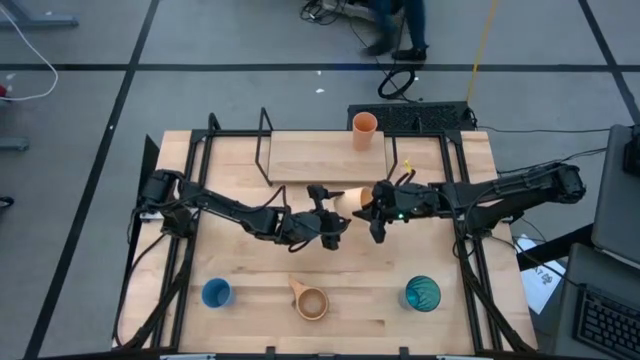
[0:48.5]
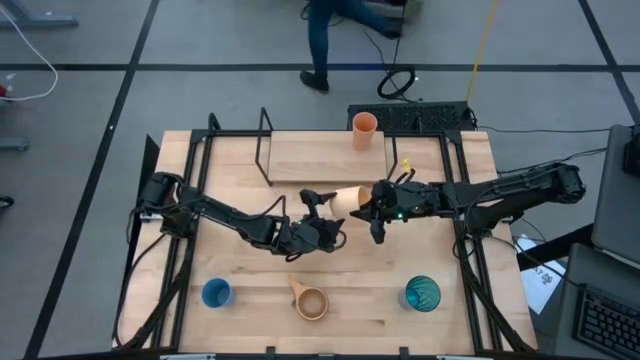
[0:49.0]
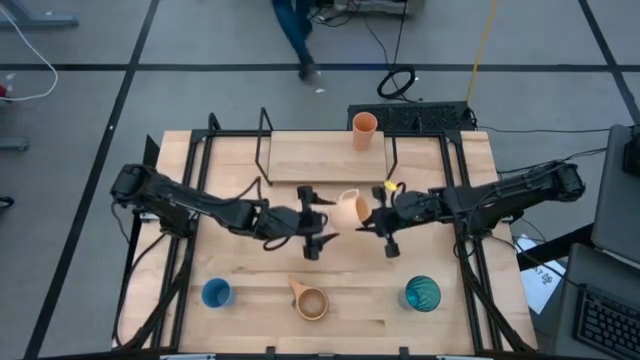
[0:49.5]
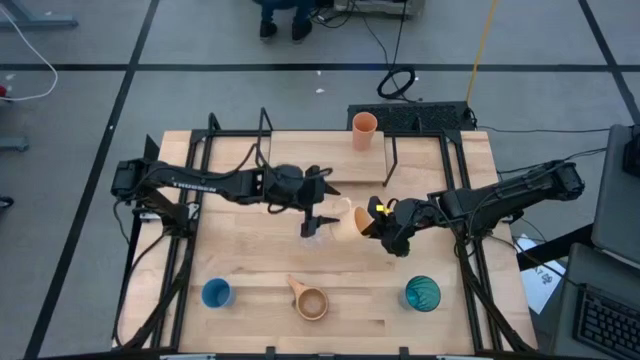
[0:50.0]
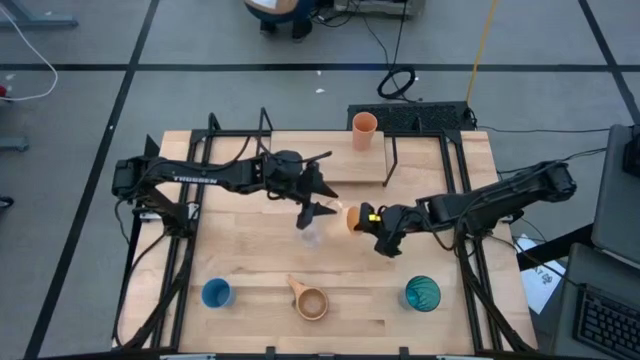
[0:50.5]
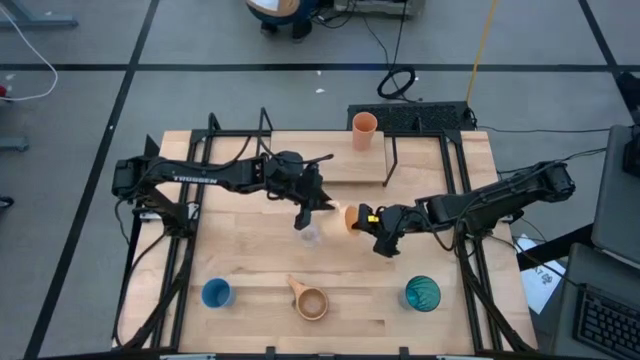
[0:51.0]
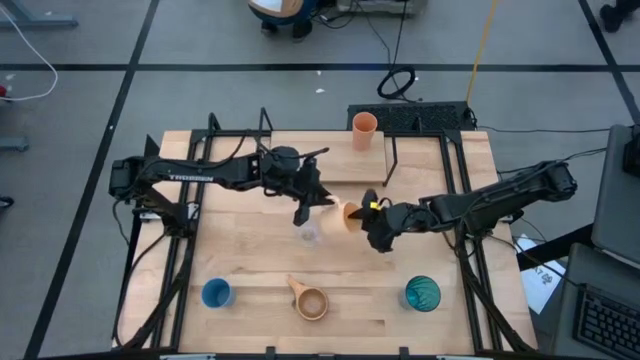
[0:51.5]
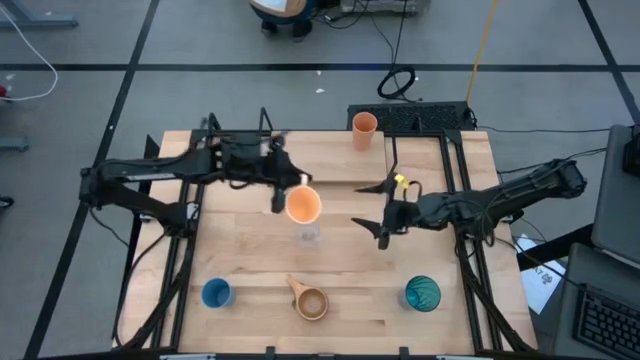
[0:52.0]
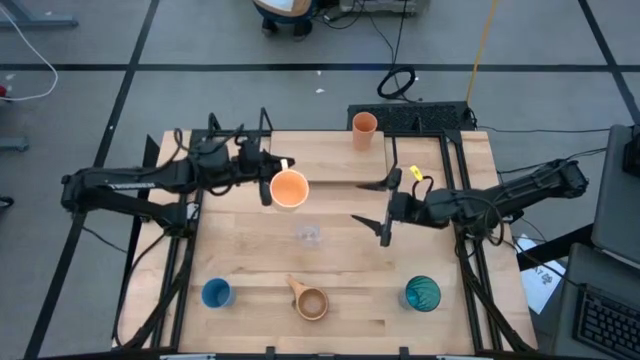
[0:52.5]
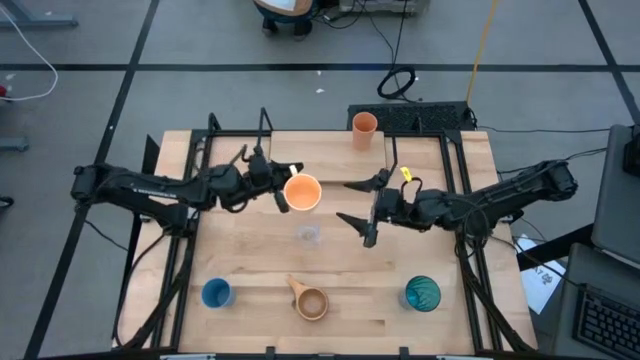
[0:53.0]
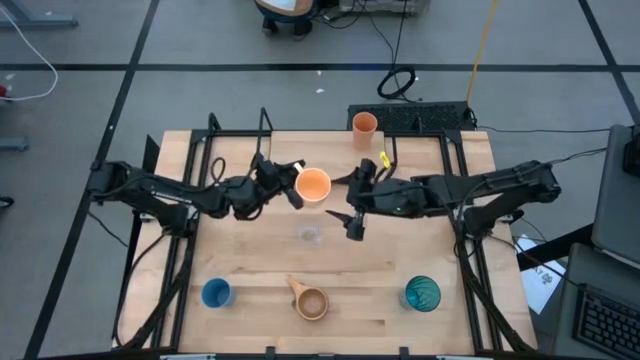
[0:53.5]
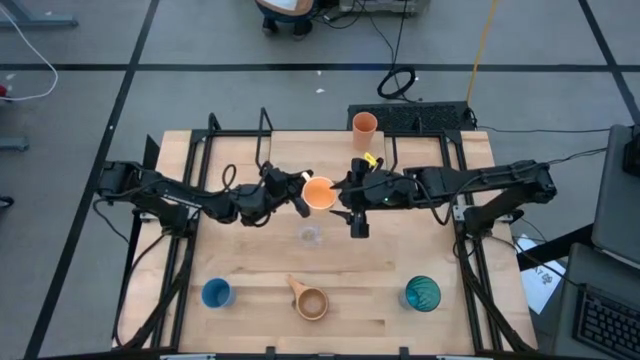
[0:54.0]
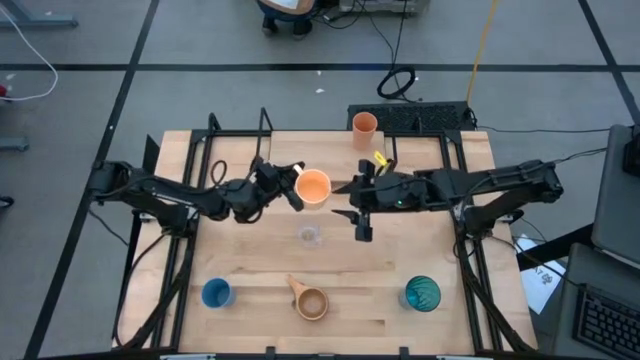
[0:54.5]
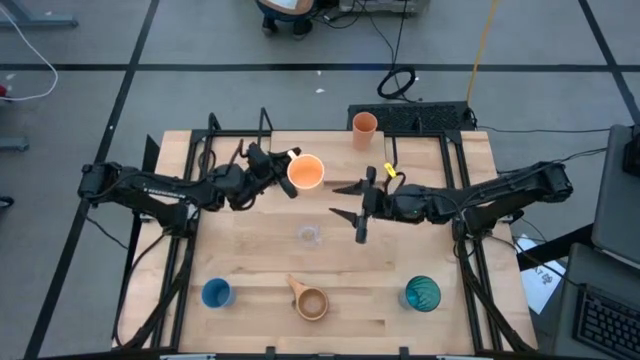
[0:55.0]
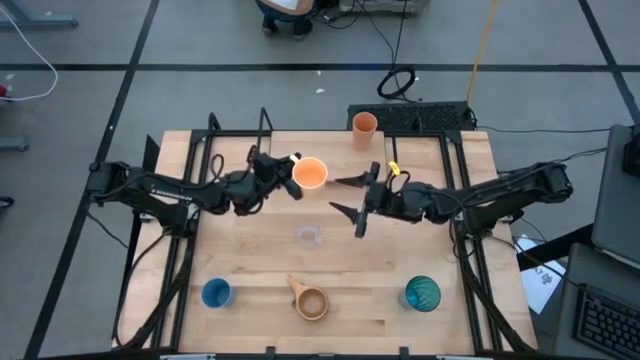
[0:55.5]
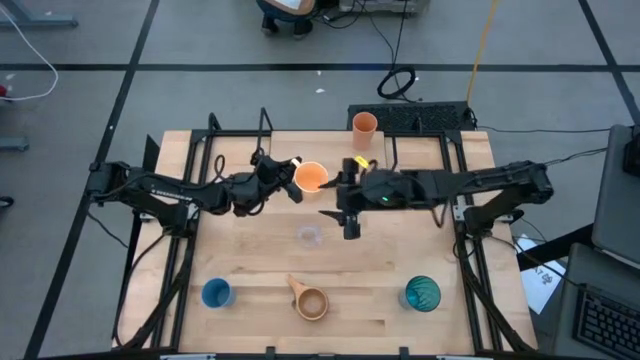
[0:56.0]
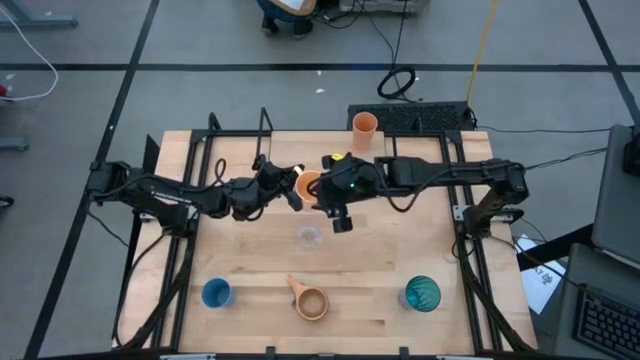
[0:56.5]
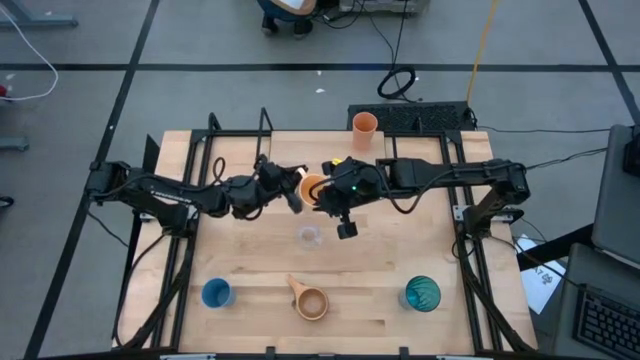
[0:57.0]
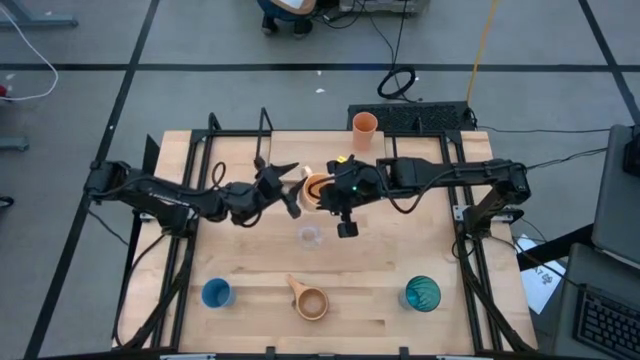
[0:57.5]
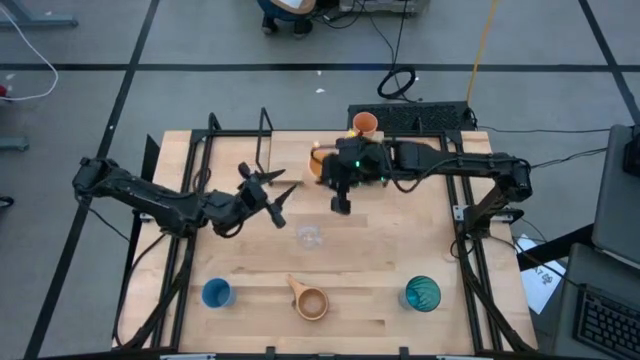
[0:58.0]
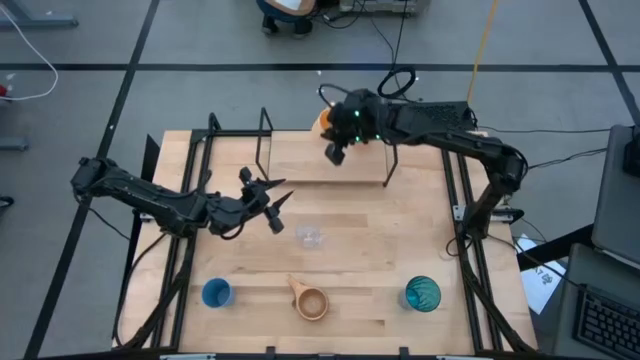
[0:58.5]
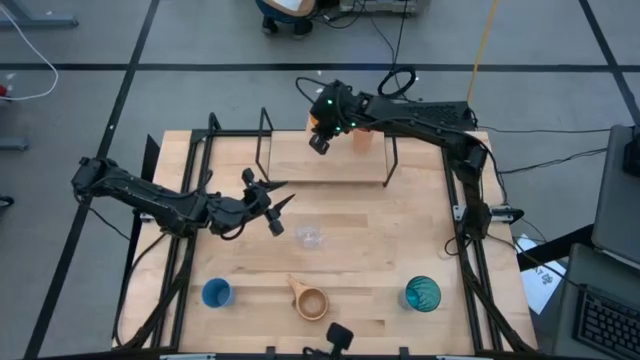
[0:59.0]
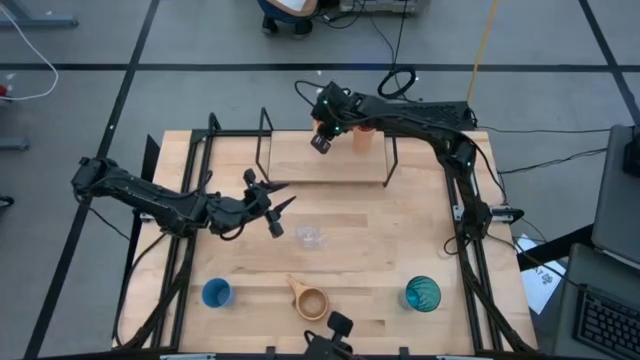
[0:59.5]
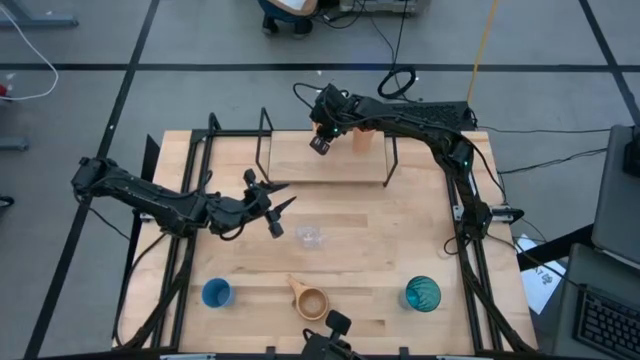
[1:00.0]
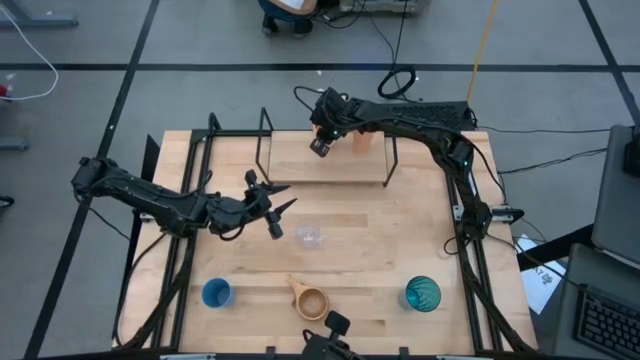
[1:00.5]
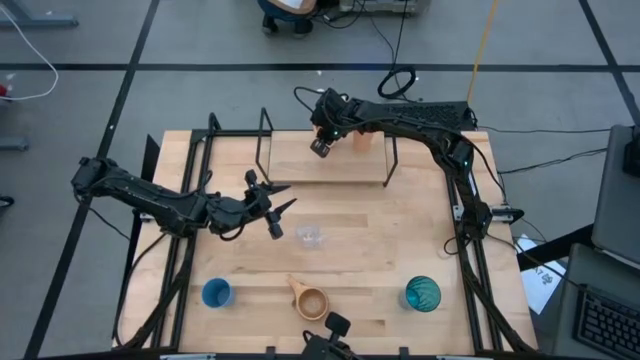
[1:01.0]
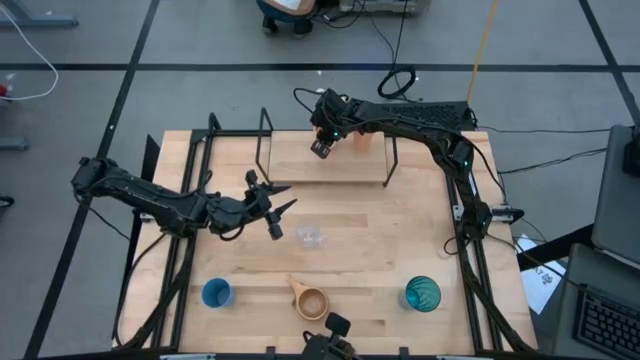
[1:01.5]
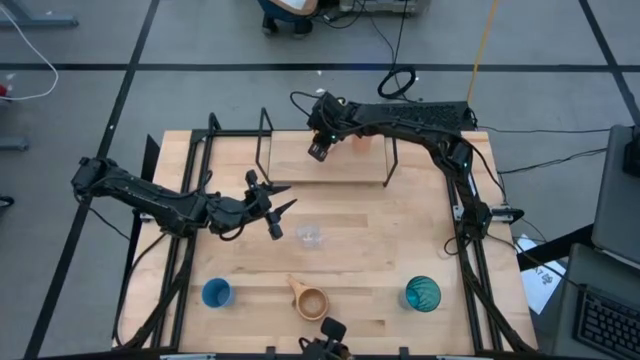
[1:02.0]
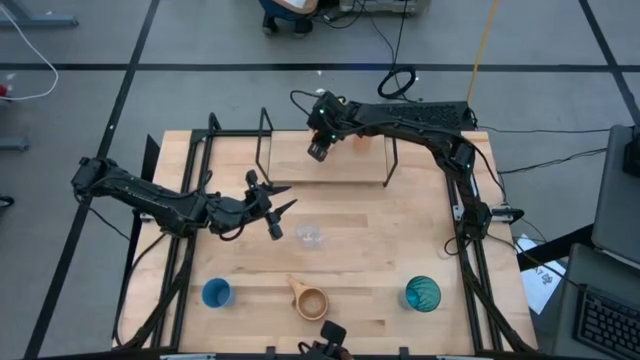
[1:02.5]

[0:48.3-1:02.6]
Task: Stack small to large cups/mugs on shelf
Put the light pink mug on the shelf

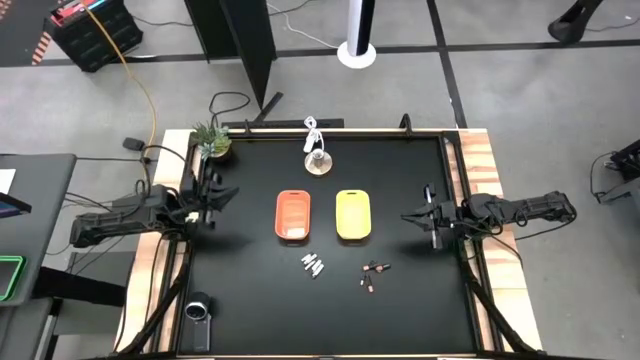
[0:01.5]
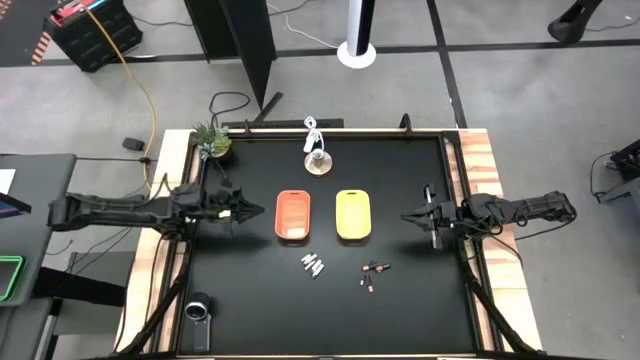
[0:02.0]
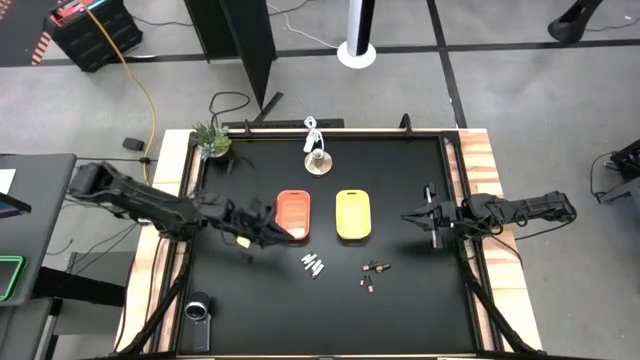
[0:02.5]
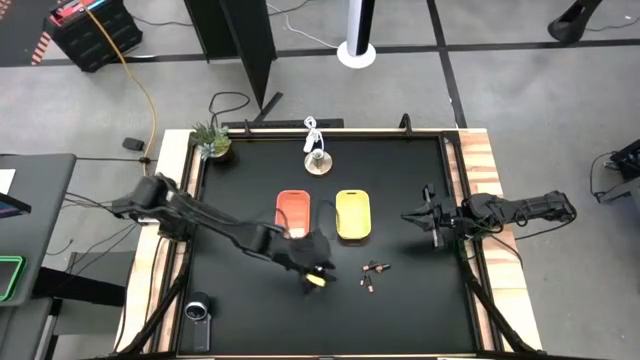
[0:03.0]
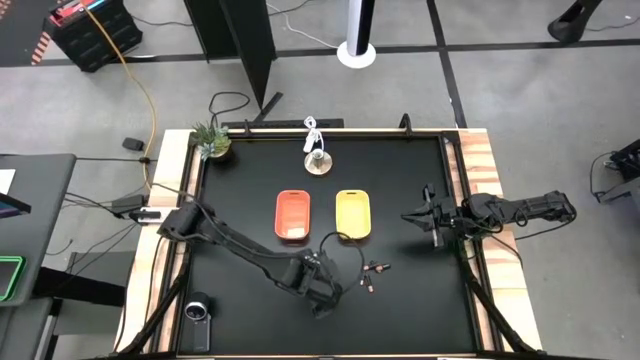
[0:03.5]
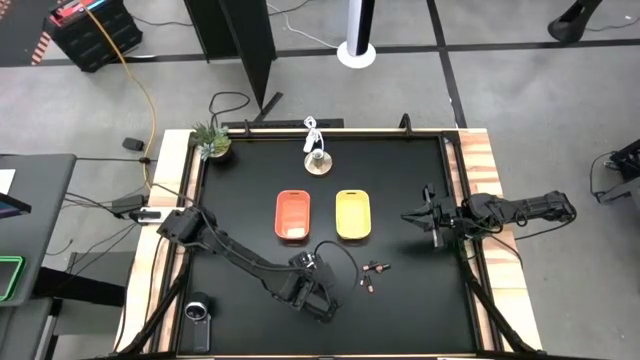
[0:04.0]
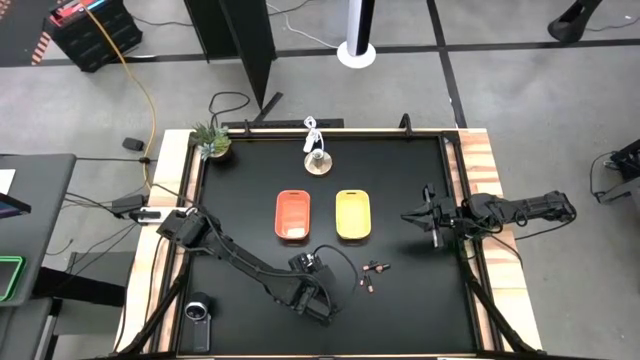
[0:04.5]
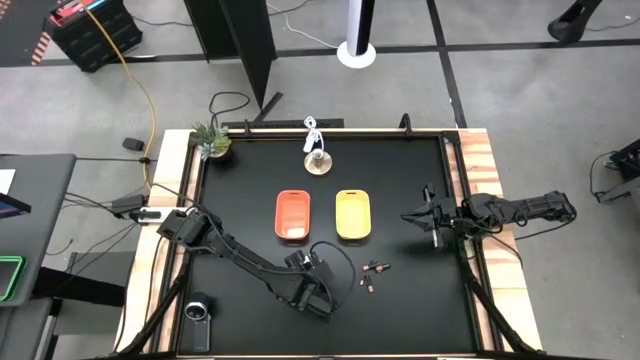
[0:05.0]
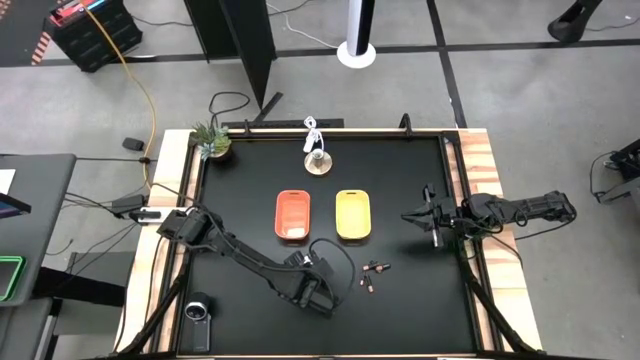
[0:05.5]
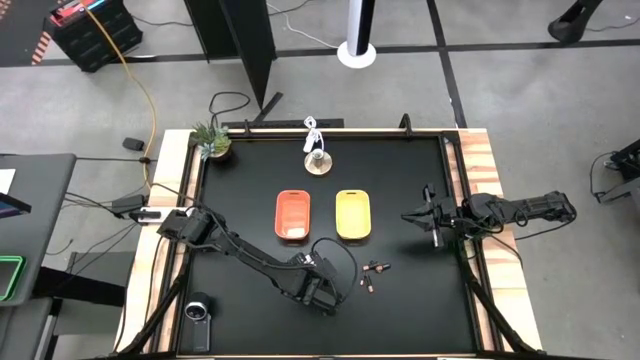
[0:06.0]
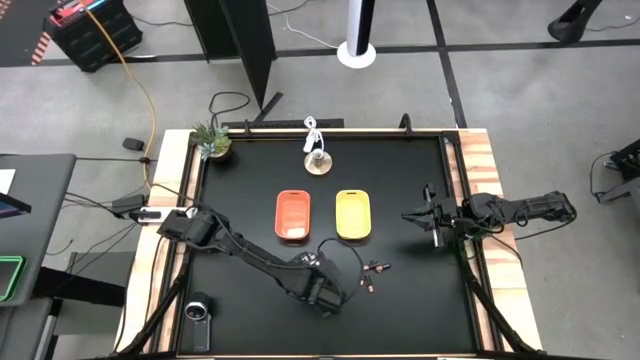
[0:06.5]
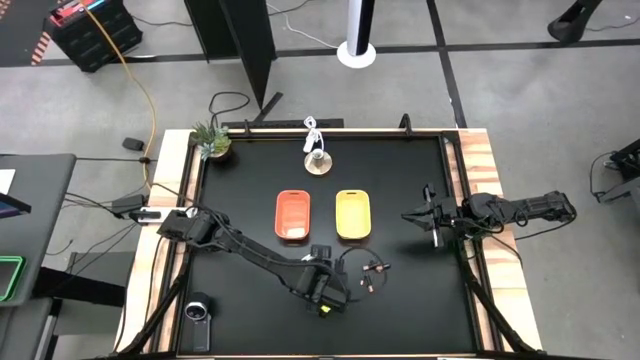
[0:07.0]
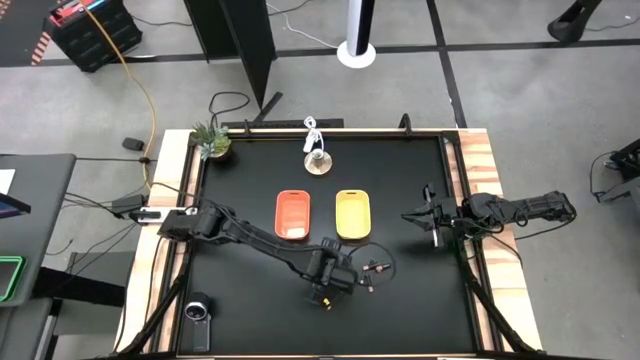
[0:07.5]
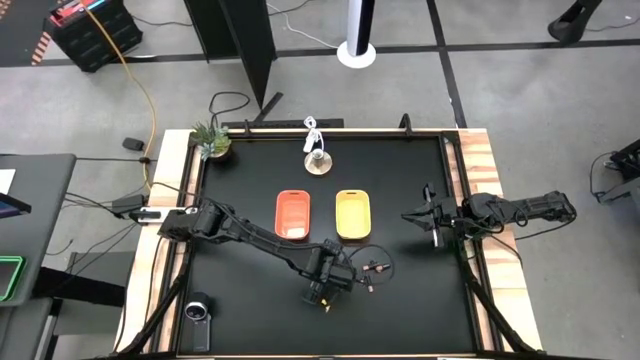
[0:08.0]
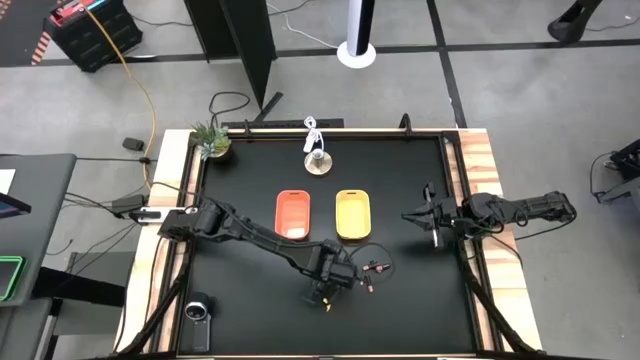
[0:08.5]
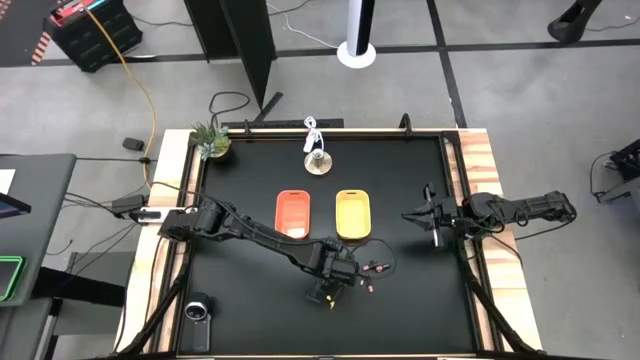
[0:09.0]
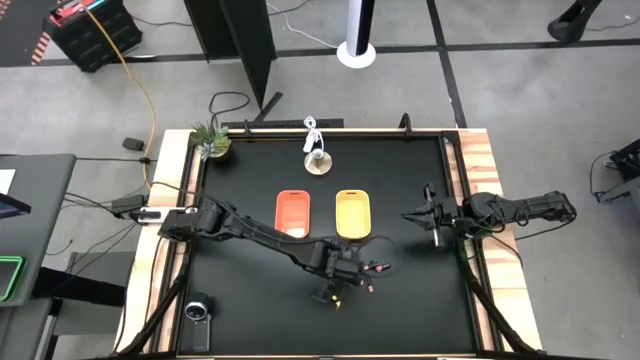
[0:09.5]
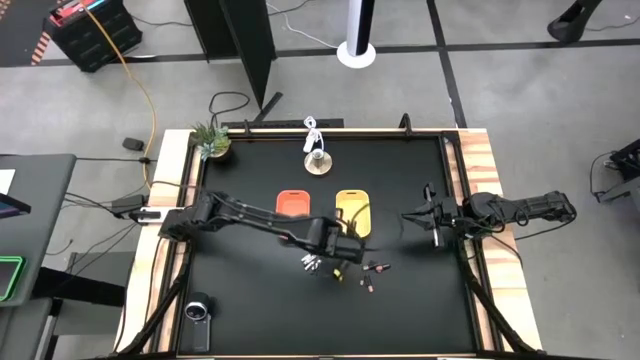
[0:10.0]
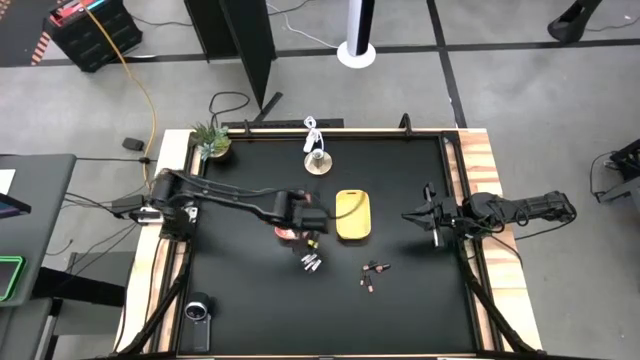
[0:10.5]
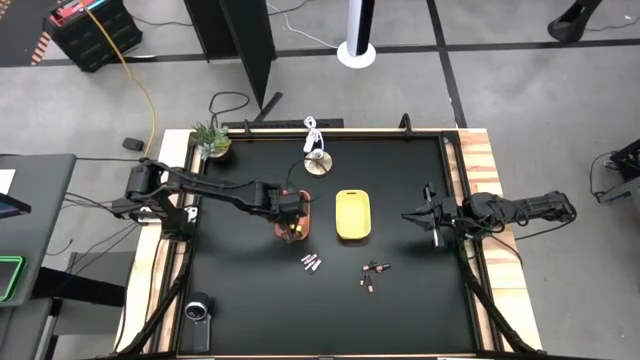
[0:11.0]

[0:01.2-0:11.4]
Task: Sort batteries
Put the silver battery into the orange bin
